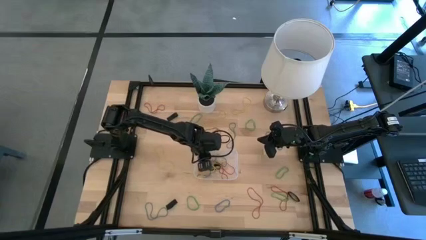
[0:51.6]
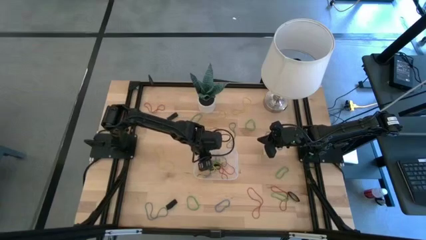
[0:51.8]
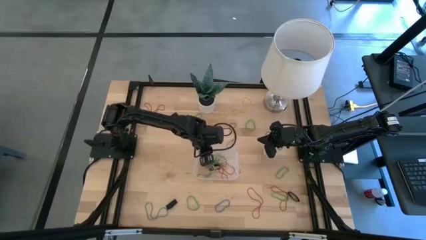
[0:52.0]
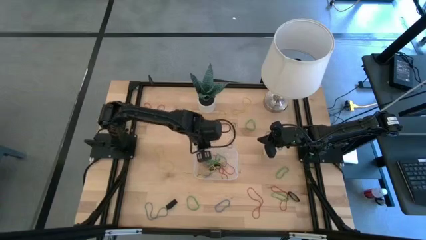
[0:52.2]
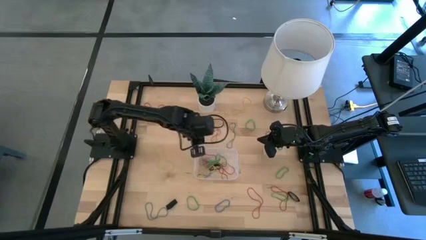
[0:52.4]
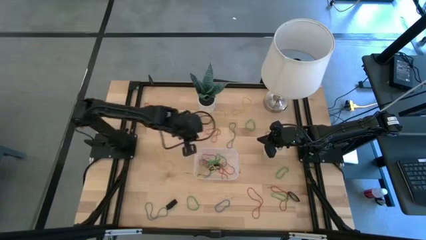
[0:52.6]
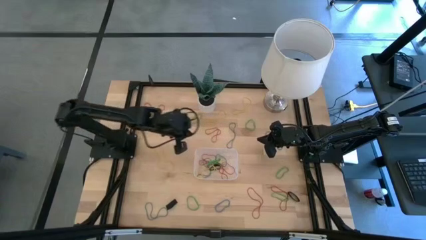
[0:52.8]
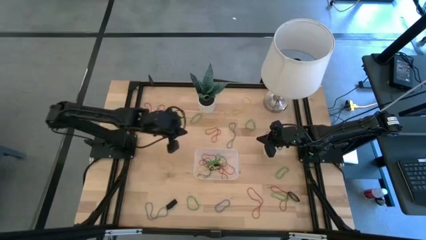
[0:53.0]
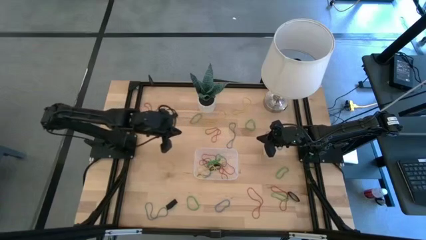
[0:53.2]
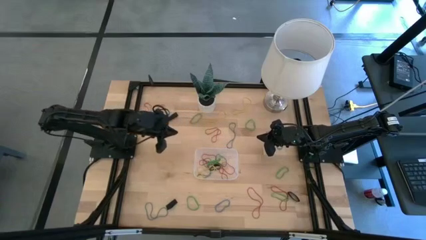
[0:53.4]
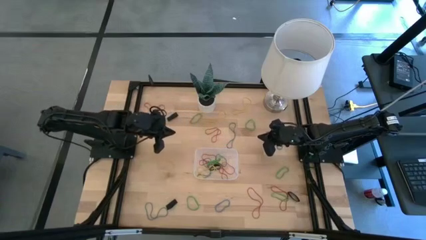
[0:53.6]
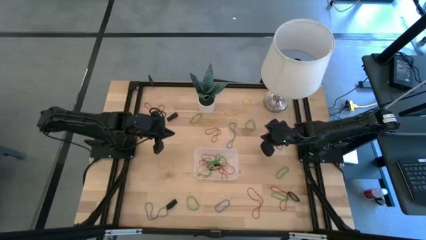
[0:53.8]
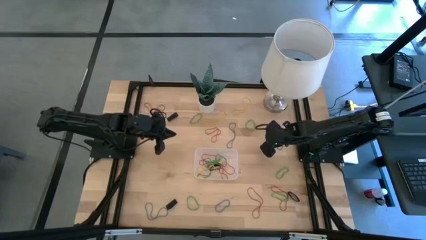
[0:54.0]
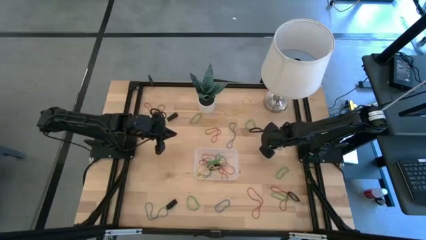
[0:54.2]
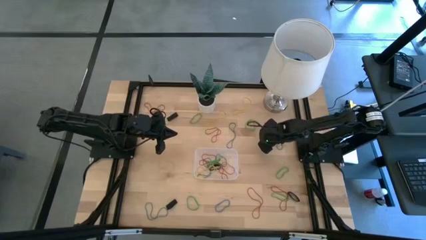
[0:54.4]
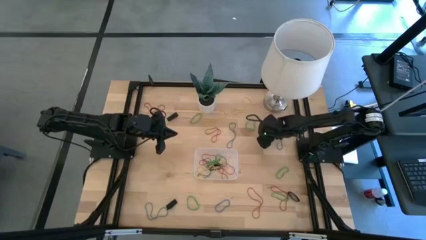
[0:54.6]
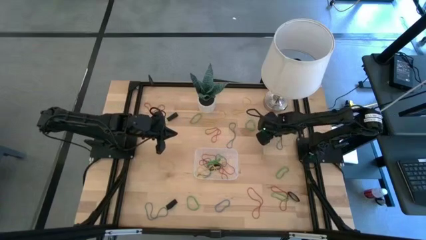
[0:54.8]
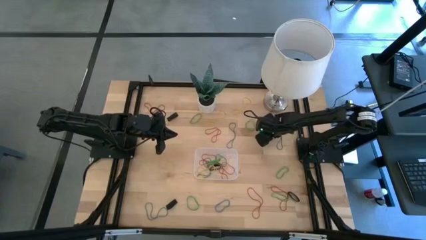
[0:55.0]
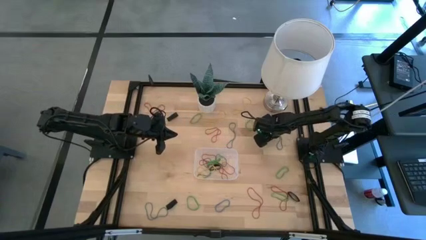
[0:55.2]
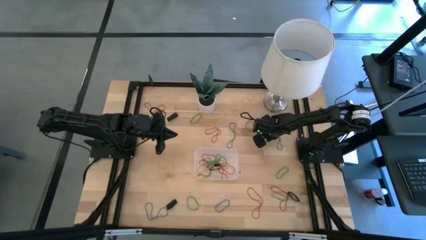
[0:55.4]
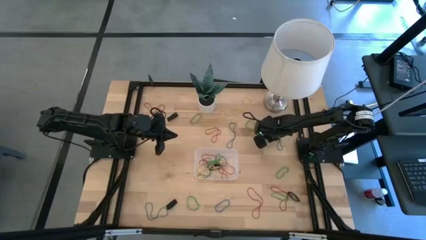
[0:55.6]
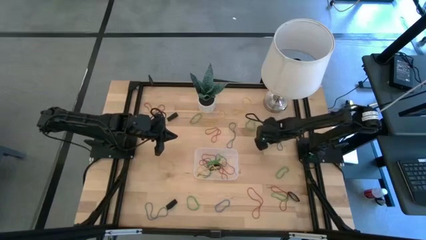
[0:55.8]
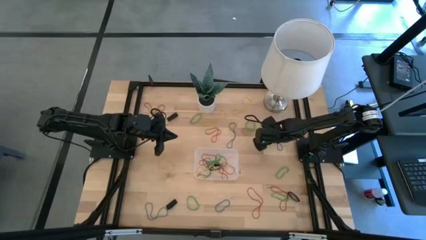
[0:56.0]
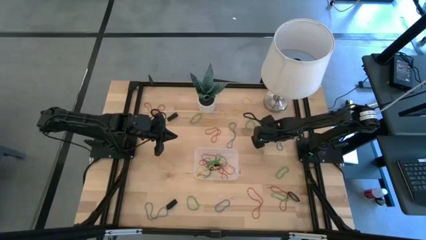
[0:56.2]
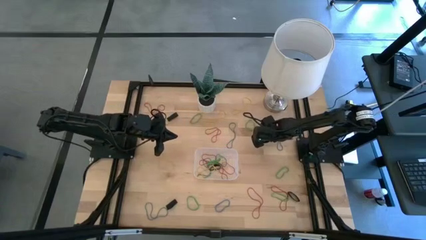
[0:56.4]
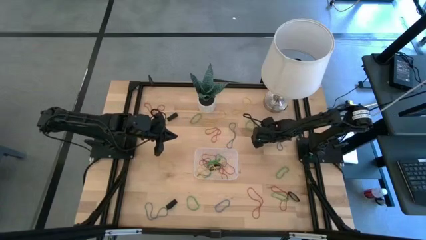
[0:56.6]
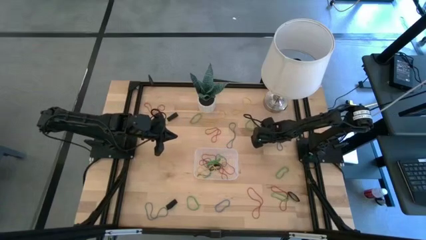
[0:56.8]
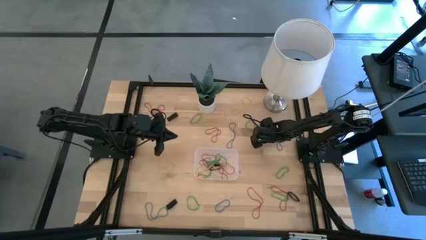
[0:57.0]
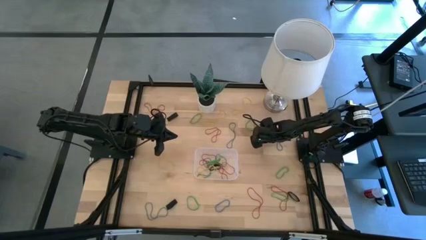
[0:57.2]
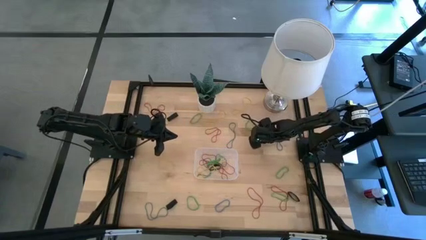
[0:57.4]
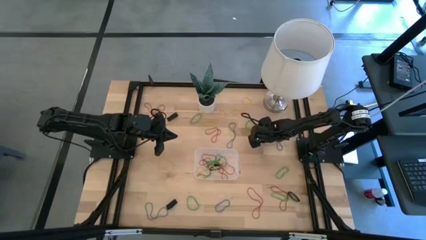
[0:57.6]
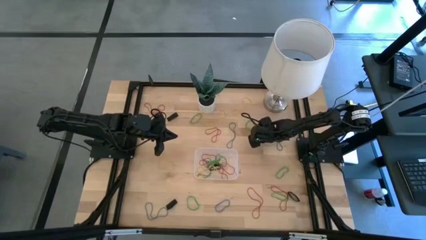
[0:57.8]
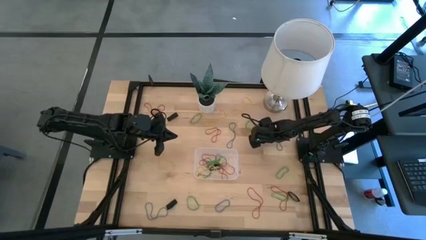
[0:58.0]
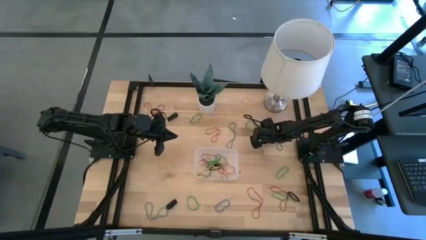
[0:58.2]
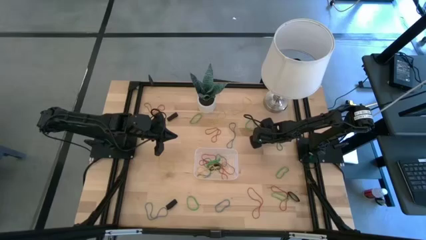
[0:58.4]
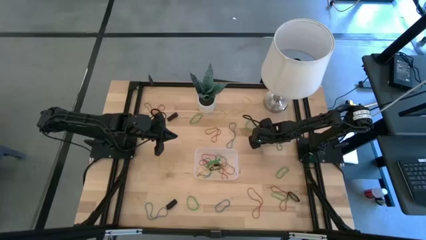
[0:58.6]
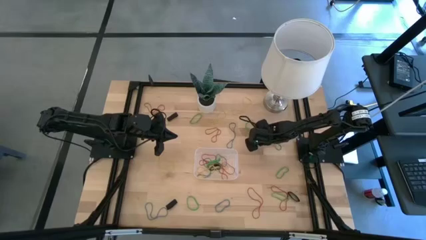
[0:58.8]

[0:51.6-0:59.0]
Task: Pick and place rubber bands into bin
Put the blue rubber band into the transparent bin

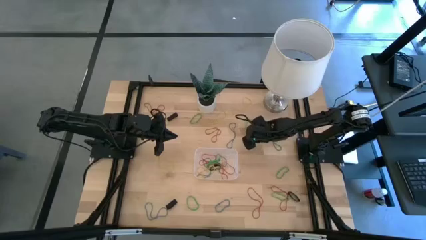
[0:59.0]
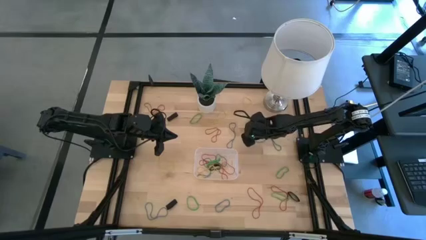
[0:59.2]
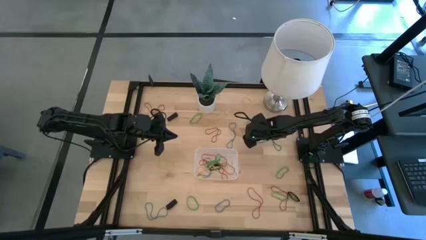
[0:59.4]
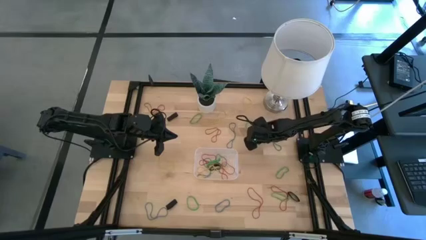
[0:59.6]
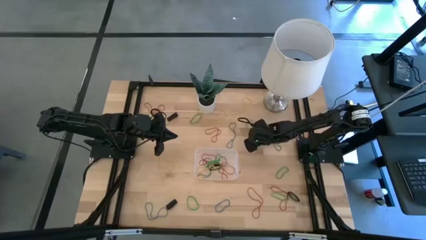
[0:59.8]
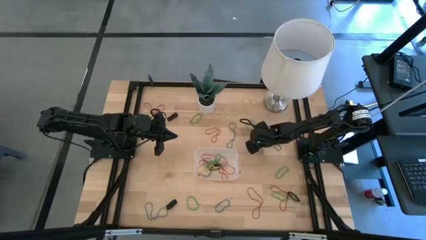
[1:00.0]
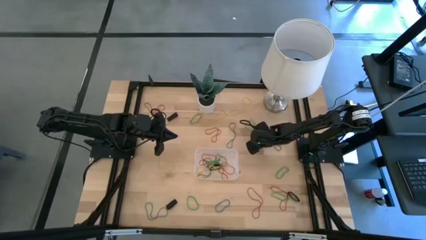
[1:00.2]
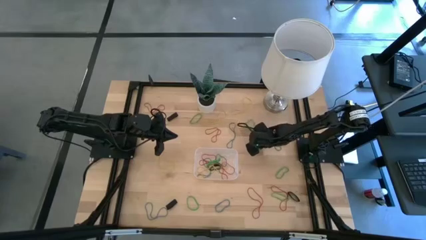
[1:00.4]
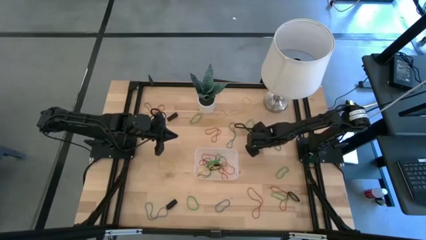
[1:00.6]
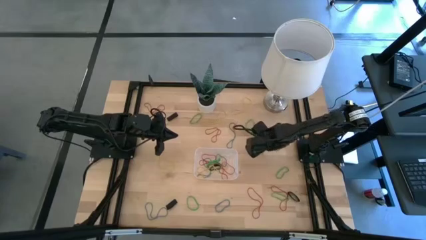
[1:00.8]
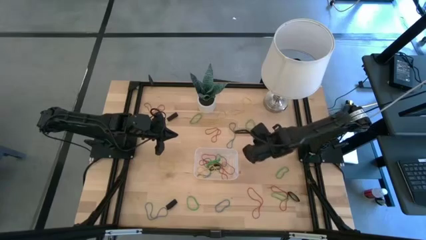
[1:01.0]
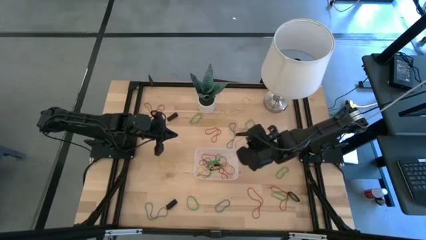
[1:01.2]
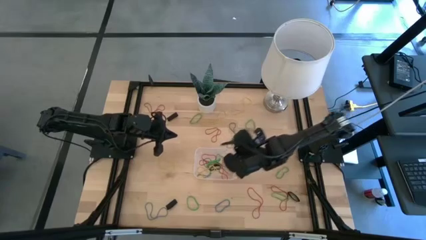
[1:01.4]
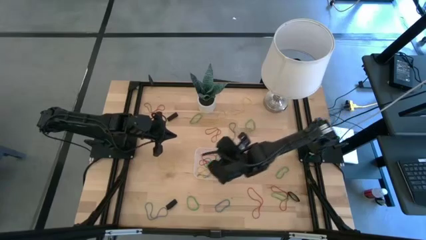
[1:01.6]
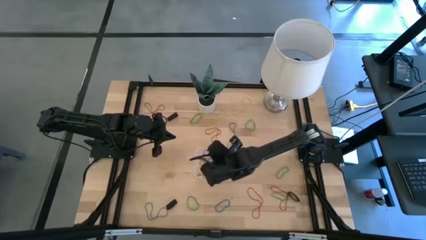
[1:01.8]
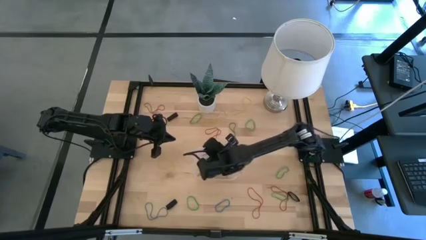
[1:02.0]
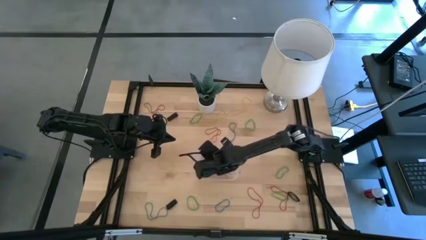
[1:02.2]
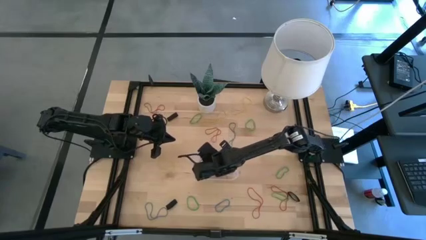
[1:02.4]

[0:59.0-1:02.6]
Put the blue rubber band into the transparent bin

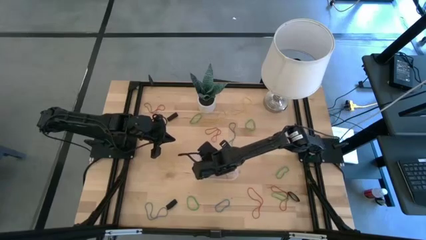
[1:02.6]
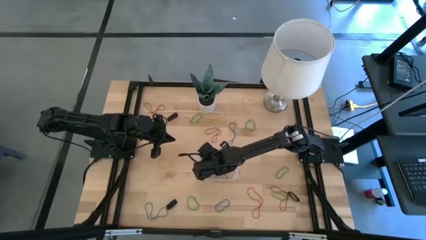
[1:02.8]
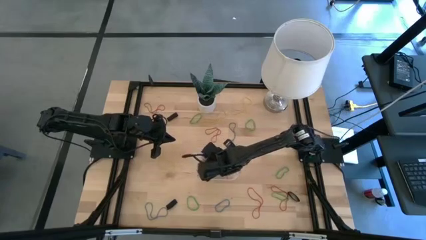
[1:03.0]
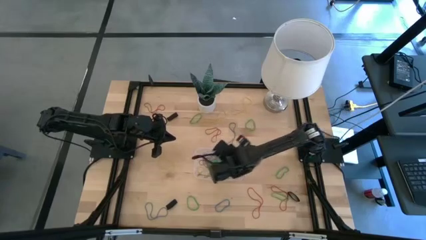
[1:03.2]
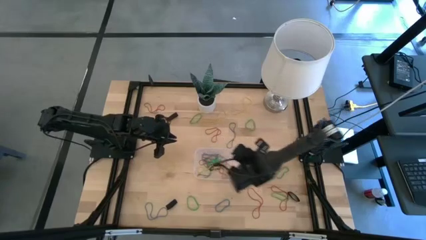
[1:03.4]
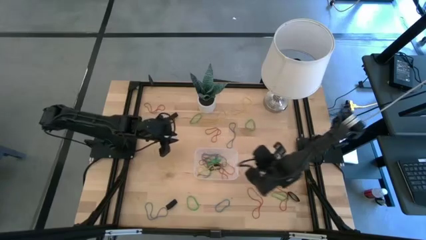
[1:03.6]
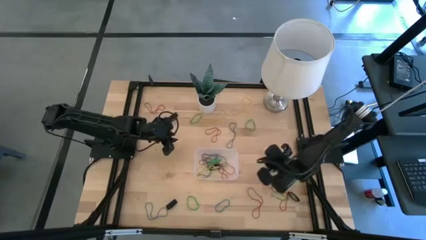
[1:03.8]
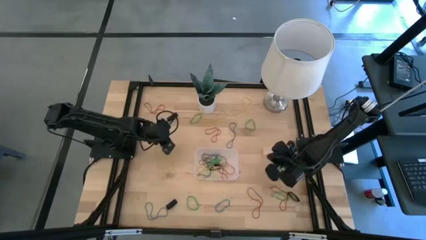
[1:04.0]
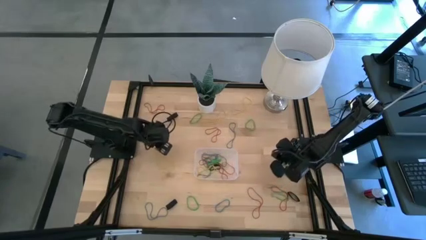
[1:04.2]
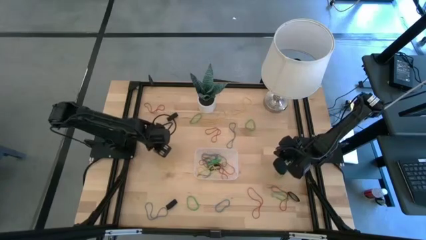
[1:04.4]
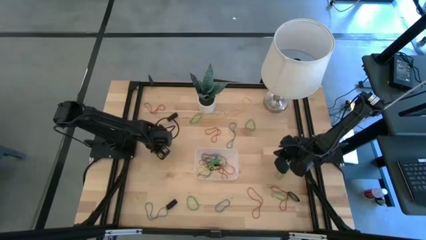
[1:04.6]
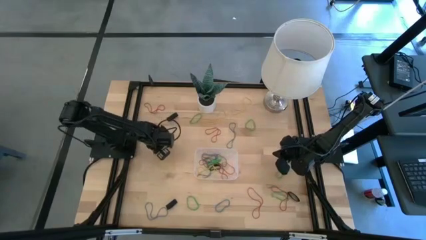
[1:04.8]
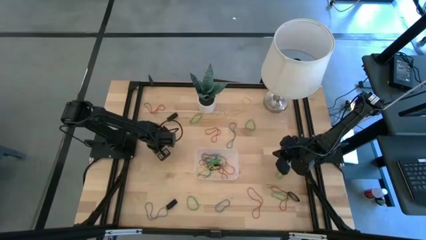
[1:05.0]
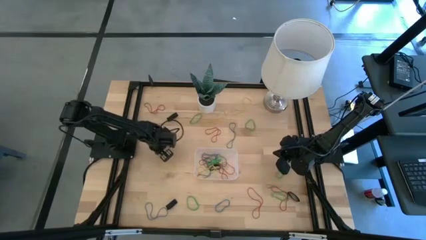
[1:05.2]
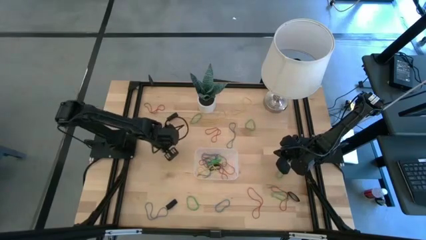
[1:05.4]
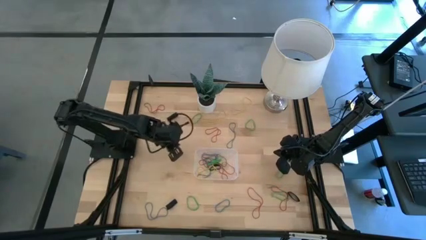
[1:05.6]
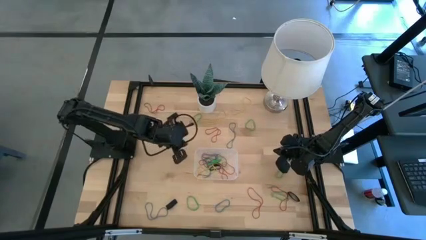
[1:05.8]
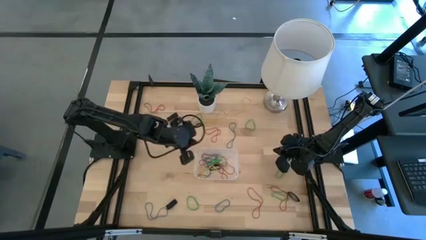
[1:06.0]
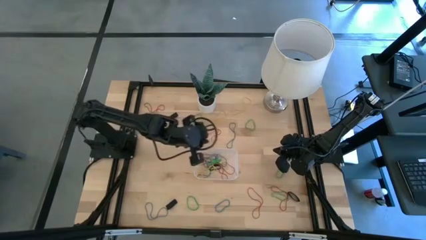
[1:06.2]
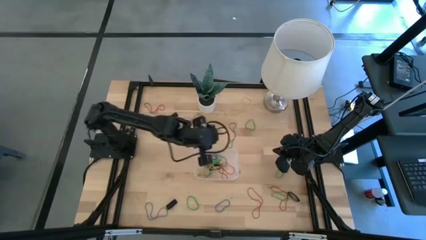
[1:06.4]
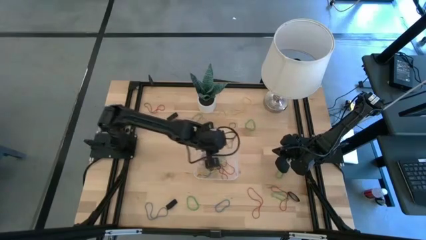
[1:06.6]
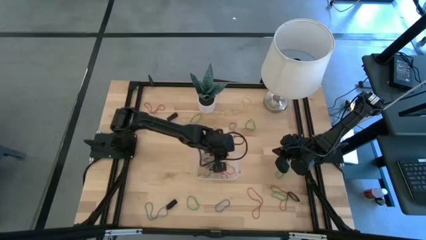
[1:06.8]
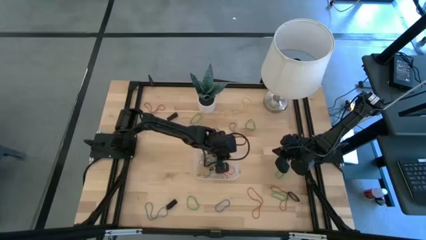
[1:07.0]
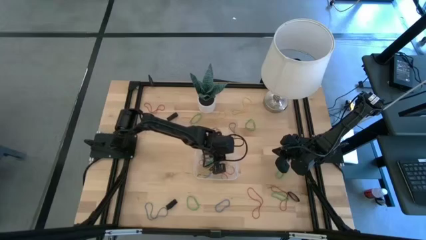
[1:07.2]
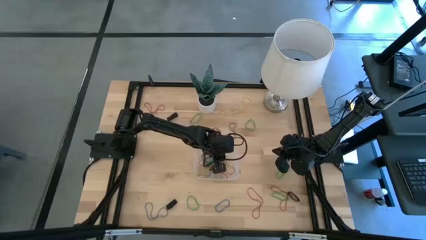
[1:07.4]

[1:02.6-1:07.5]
Put the left yellow rubber band into the transparent bin
